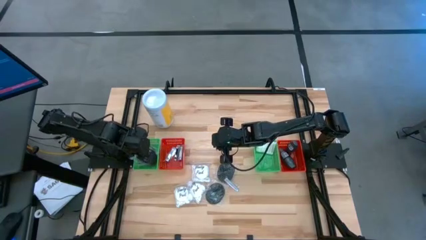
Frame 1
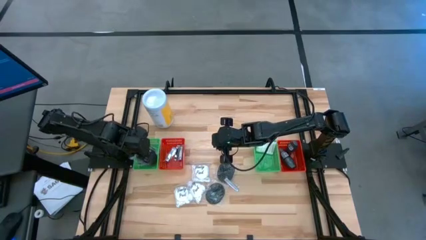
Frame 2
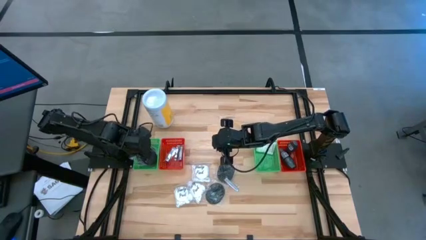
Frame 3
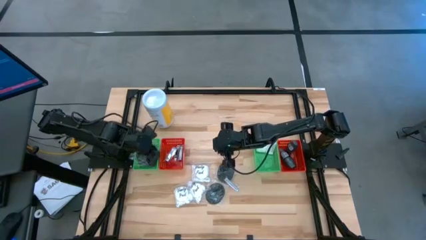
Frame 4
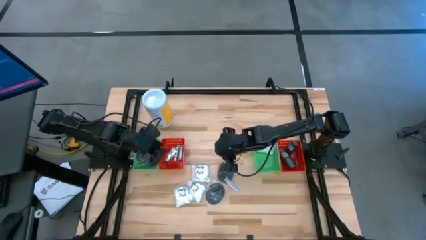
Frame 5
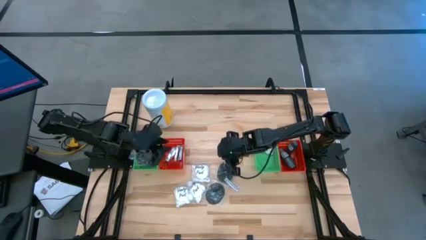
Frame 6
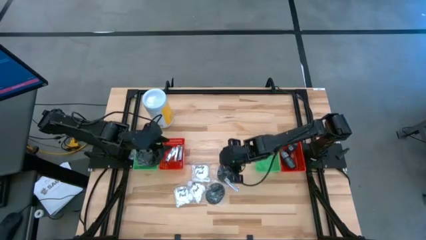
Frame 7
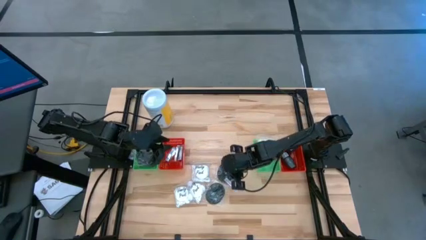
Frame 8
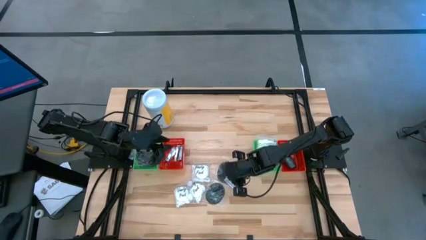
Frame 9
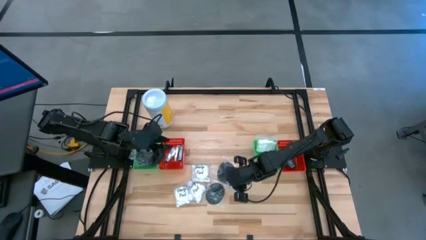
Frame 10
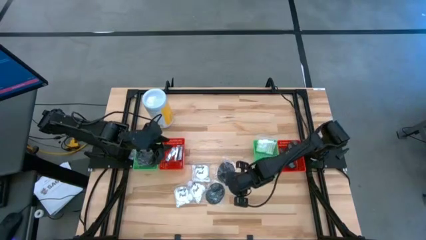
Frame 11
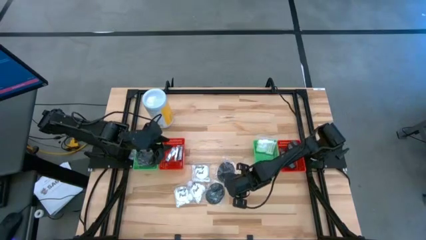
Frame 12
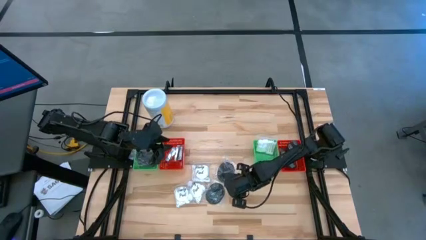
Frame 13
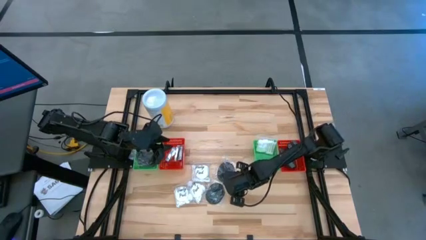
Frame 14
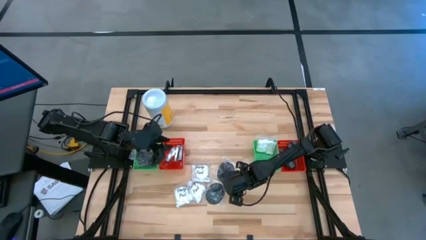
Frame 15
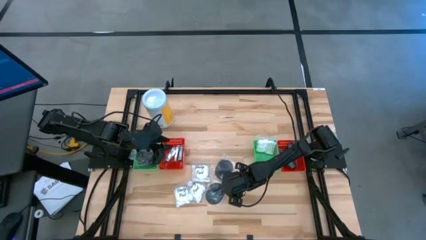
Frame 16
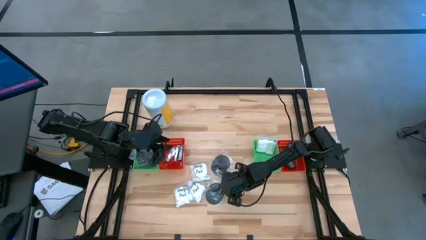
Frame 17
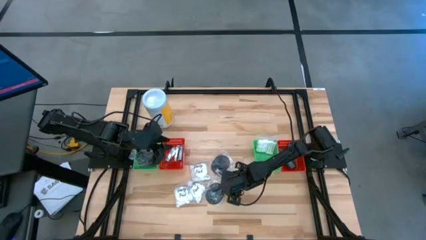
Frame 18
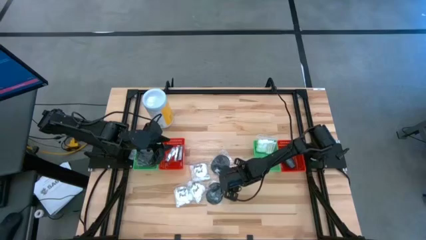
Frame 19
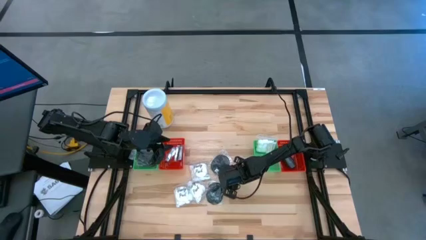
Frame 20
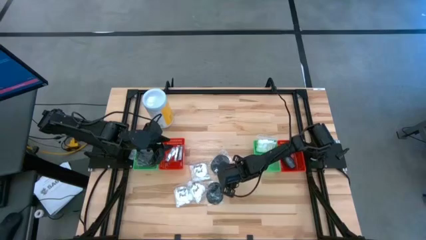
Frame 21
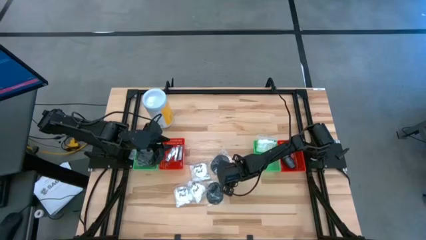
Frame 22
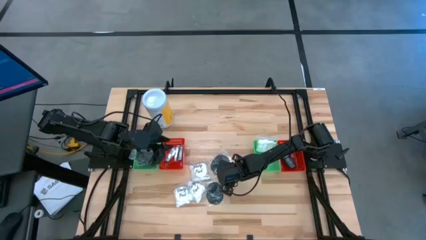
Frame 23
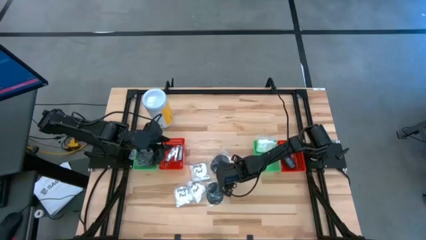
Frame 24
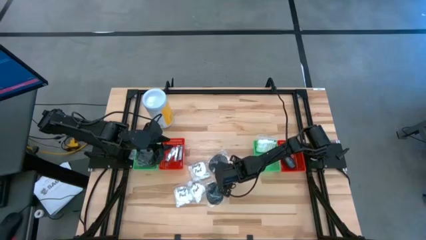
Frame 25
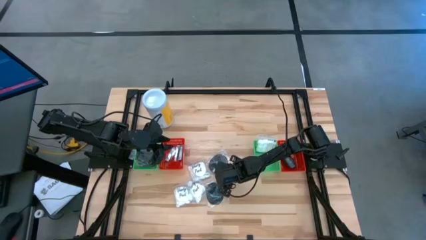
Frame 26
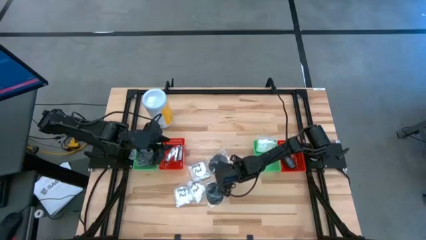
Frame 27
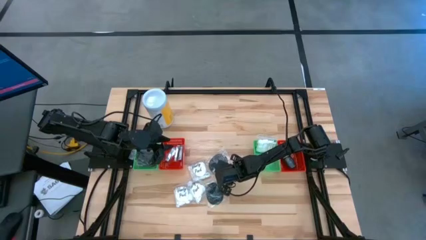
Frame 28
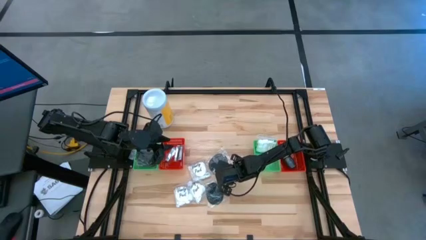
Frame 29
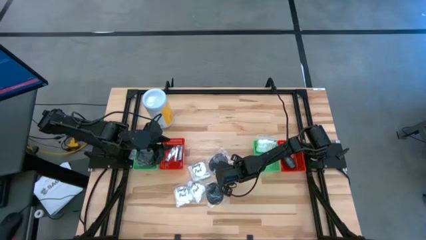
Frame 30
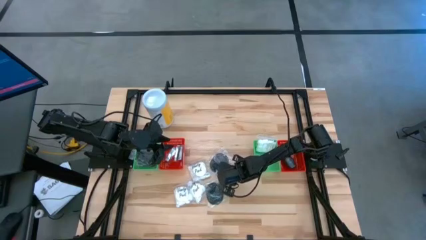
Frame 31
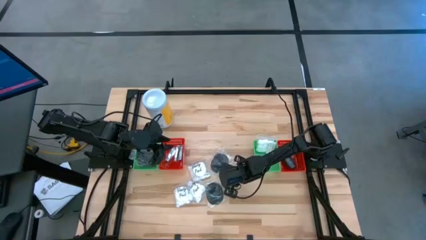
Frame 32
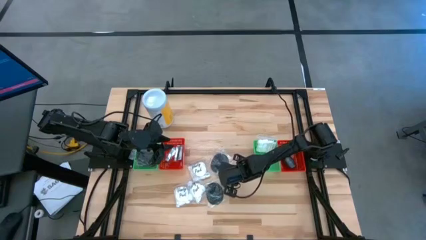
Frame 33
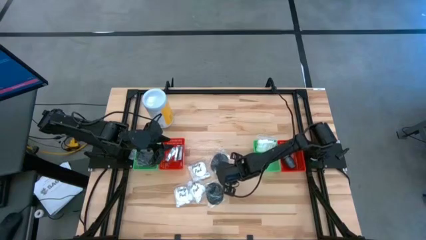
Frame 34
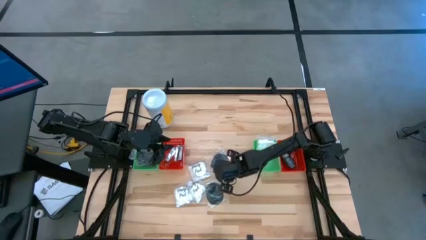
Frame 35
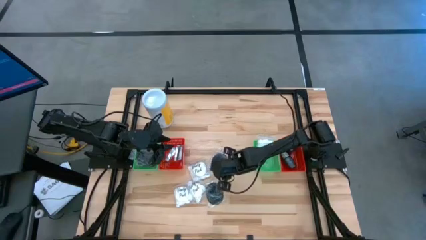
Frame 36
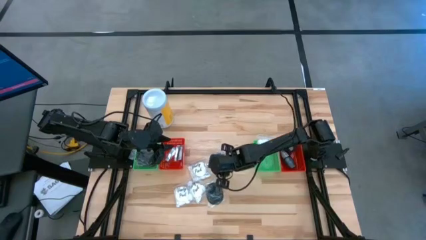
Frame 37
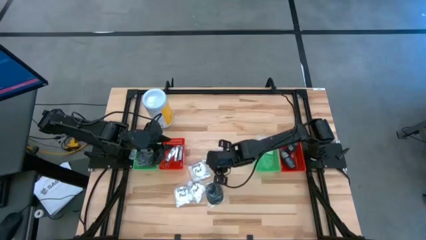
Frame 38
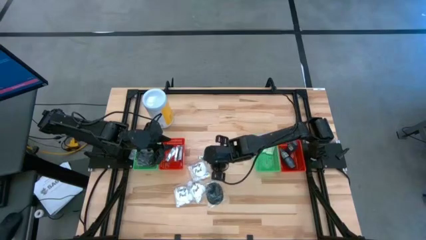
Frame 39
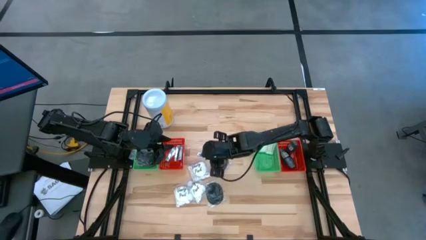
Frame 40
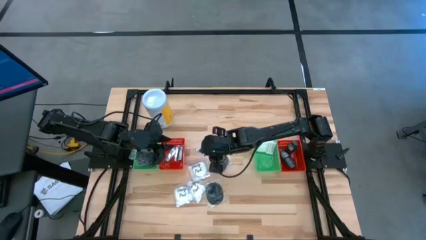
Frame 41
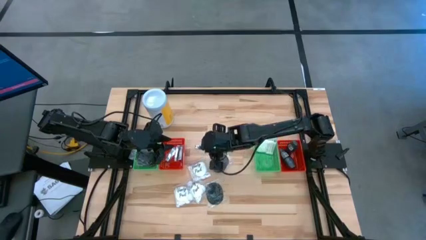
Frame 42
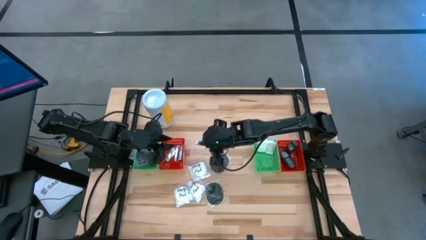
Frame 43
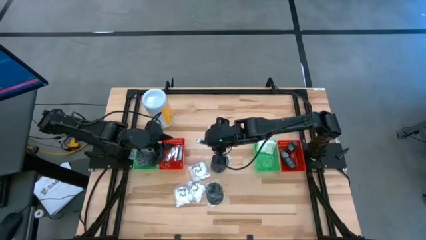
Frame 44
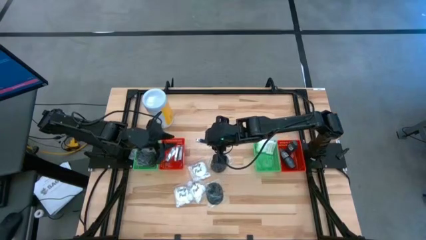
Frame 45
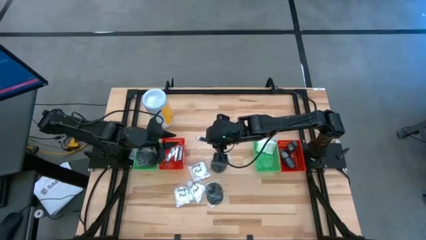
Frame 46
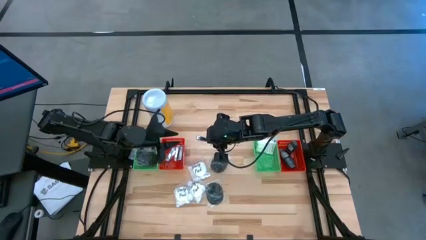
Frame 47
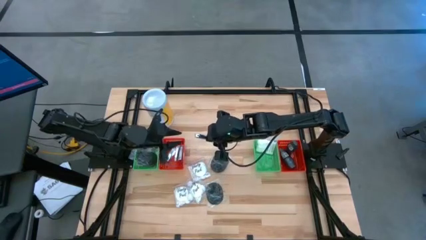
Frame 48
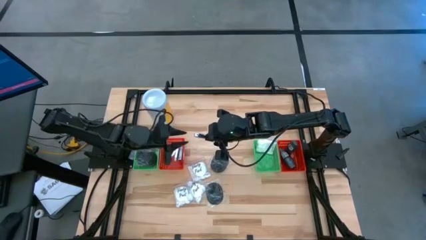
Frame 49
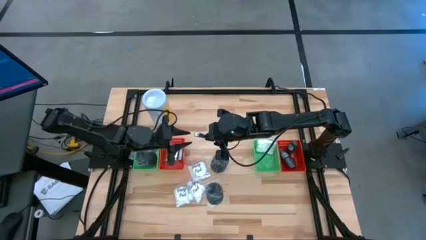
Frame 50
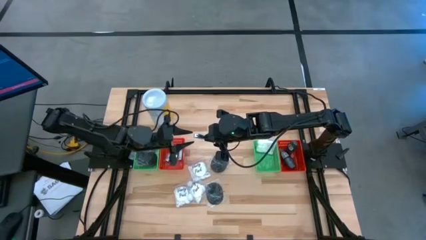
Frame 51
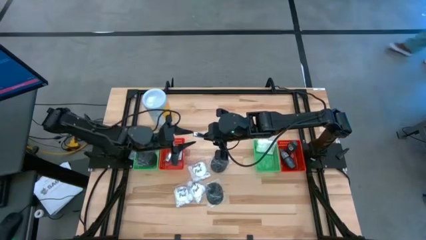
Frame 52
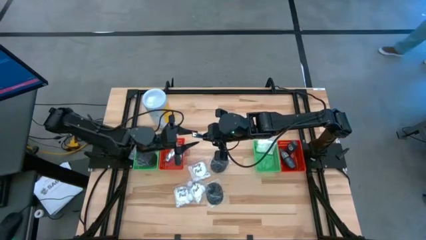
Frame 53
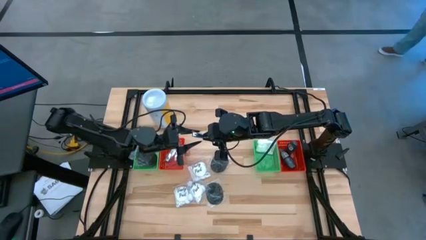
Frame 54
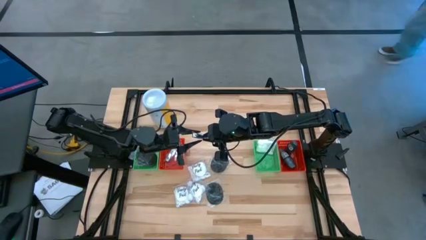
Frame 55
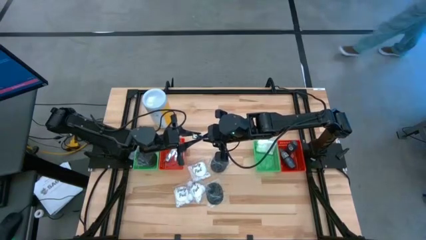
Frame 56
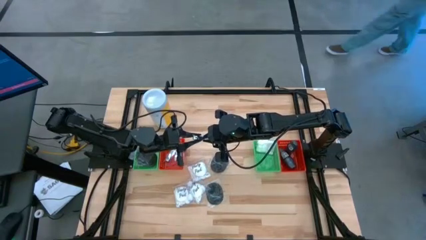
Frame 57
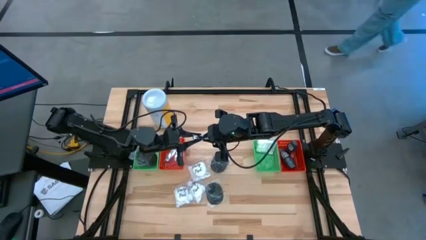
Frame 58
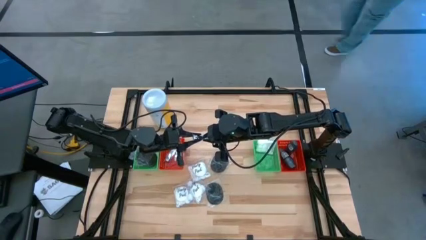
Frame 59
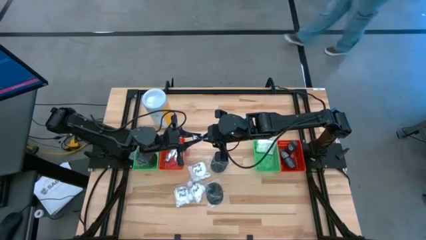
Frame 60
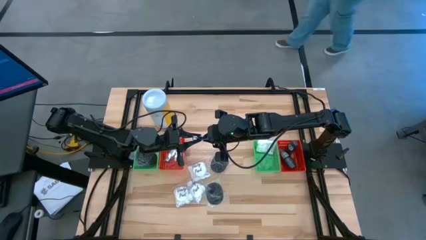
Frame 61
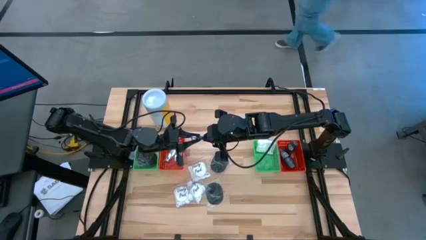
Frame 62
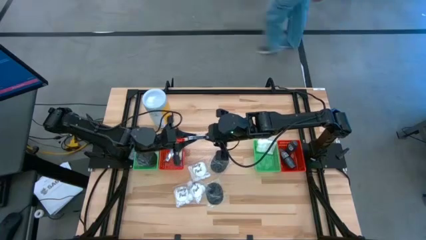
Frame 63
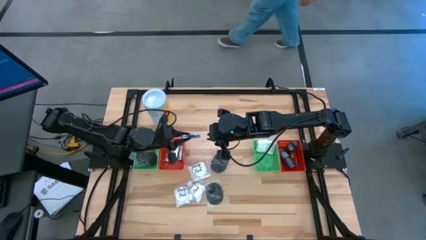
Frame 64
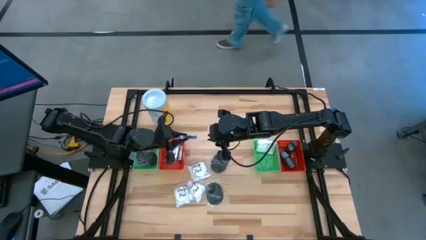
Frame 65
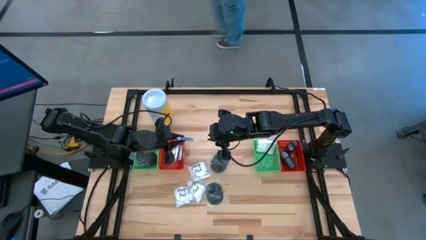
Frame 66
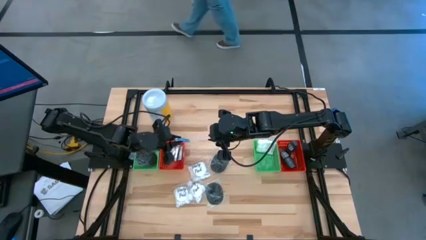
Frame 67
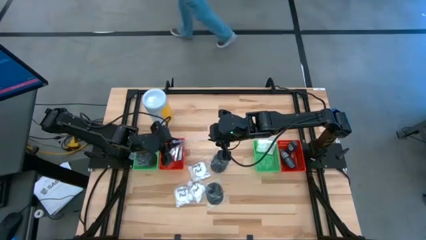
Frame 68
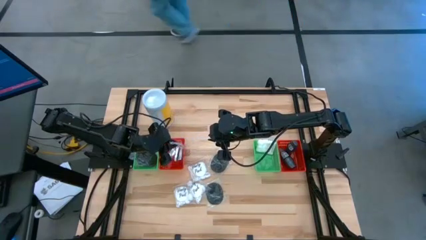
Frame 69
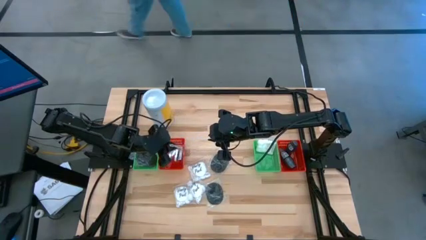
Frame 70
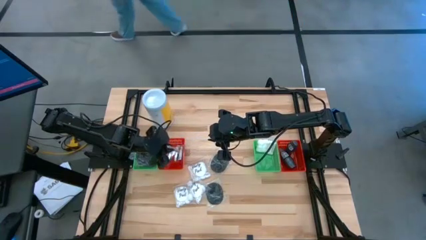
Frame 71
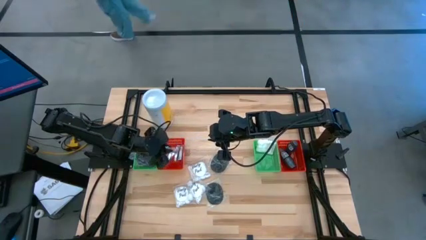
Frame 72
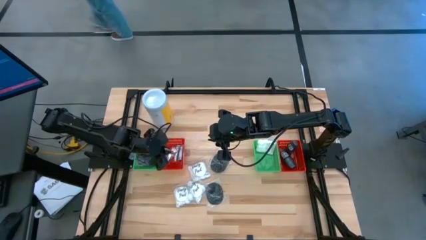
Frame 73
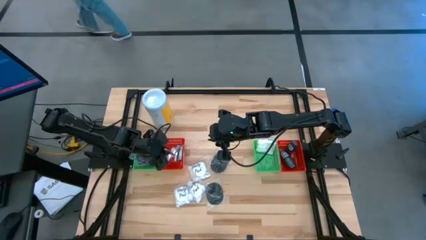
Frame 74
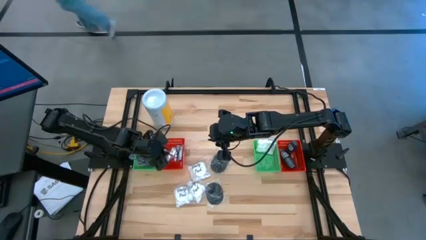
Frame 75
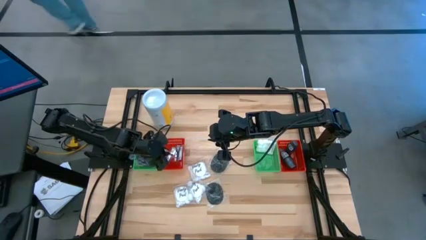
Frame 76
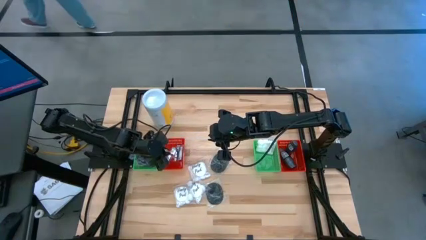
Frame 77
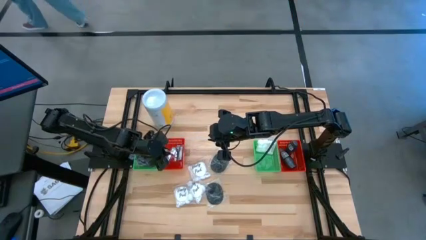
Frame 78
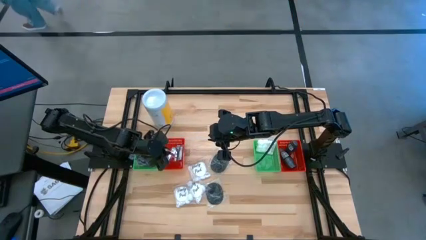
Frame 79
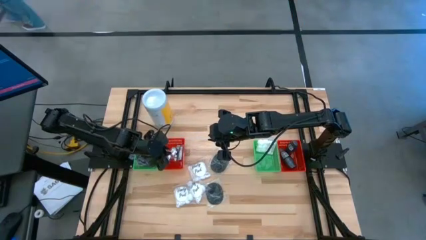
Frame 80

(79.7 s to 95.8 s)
Task: Pick & Place Travel size toiletries
Put the silver nail cutter into the left red bin
